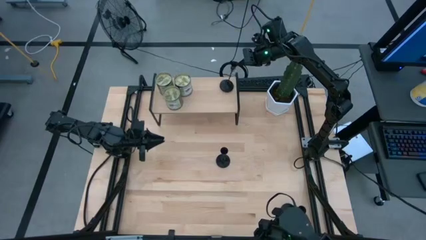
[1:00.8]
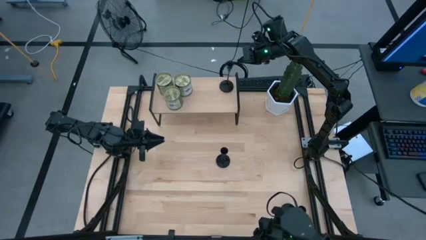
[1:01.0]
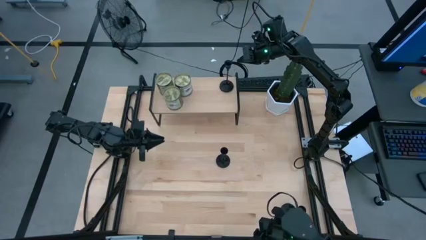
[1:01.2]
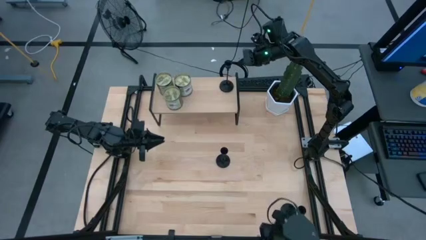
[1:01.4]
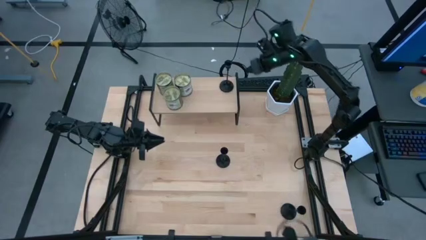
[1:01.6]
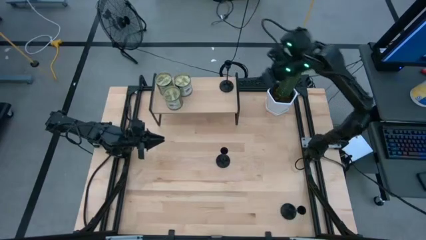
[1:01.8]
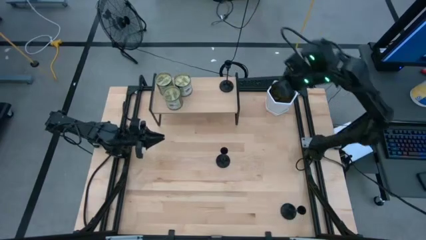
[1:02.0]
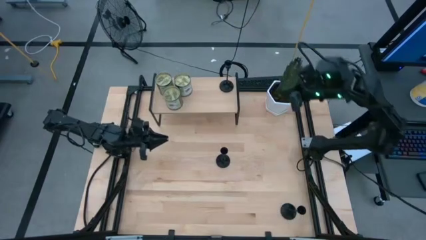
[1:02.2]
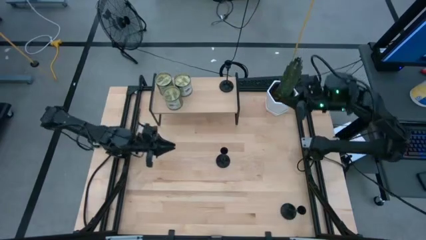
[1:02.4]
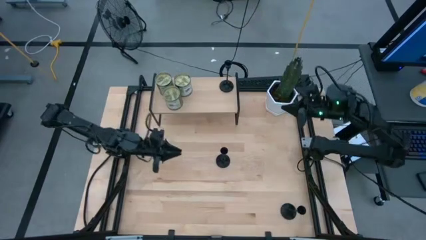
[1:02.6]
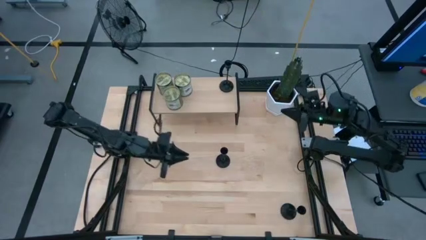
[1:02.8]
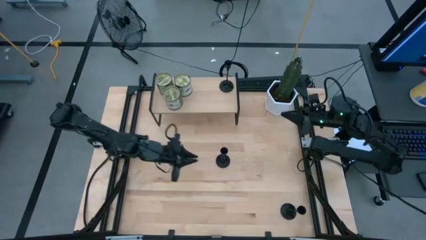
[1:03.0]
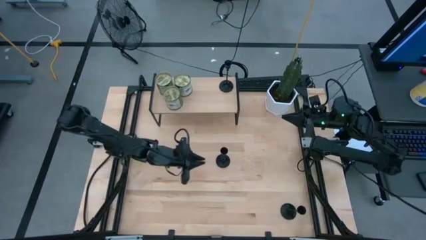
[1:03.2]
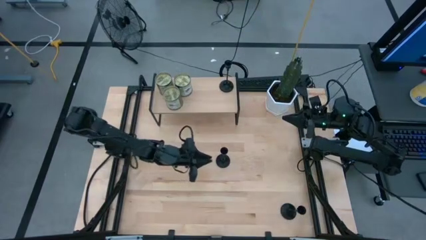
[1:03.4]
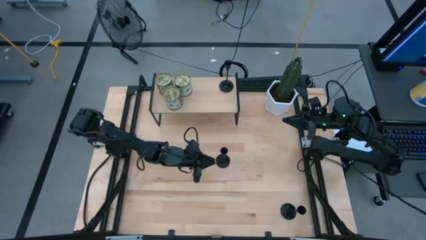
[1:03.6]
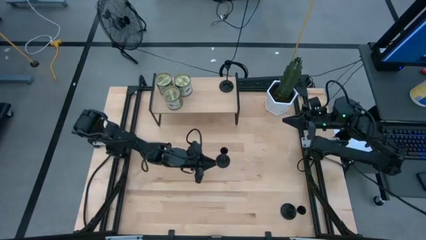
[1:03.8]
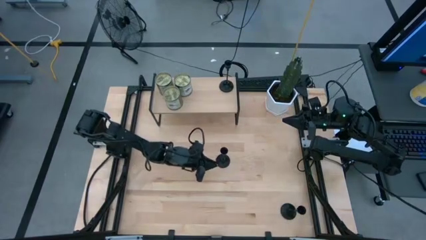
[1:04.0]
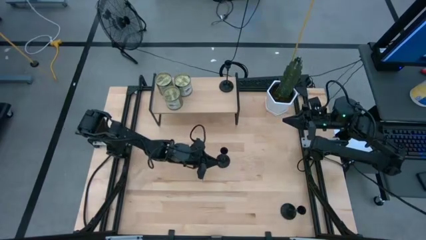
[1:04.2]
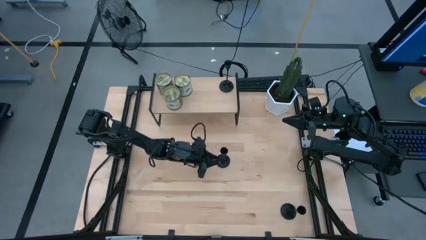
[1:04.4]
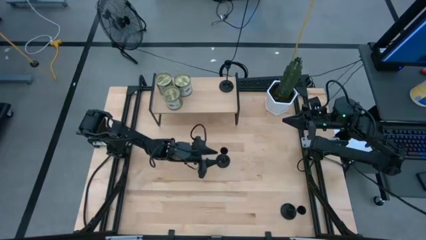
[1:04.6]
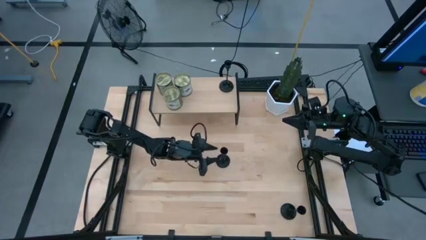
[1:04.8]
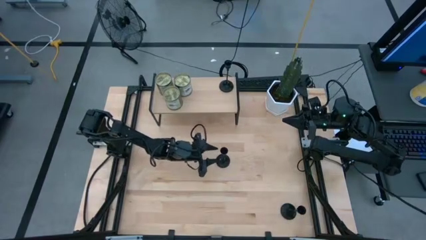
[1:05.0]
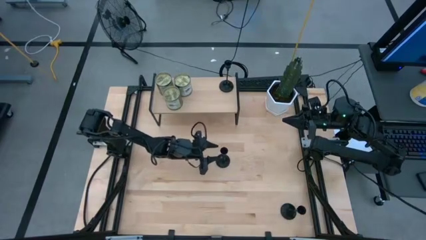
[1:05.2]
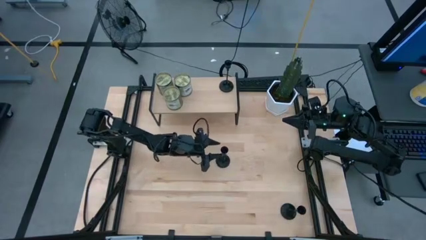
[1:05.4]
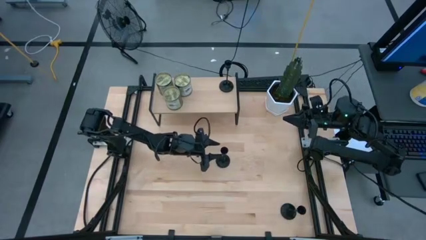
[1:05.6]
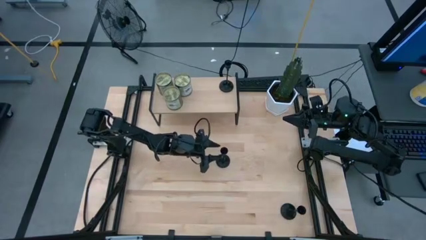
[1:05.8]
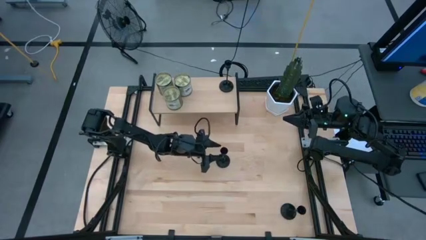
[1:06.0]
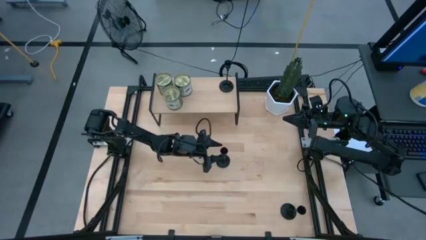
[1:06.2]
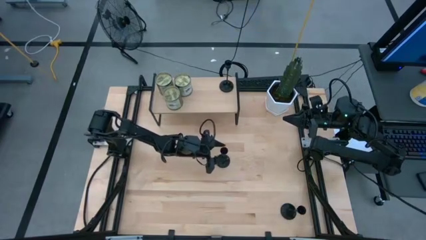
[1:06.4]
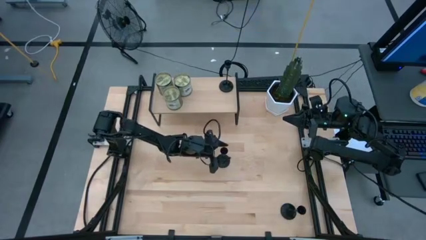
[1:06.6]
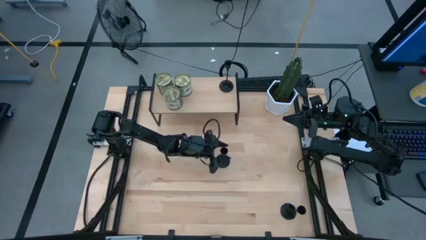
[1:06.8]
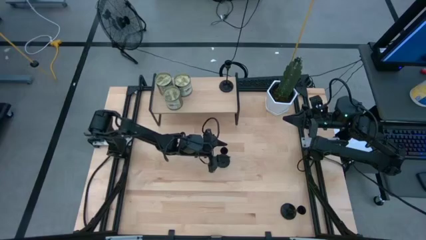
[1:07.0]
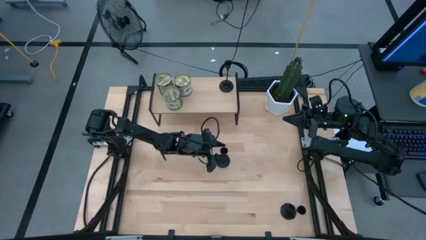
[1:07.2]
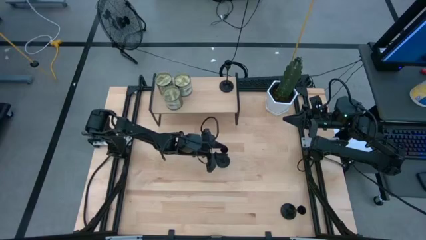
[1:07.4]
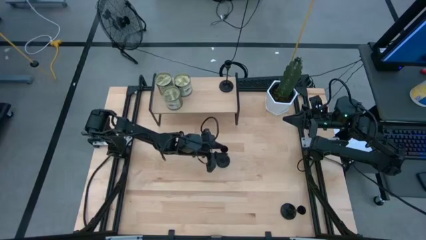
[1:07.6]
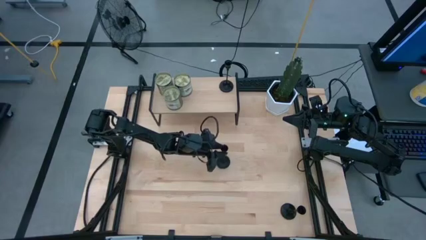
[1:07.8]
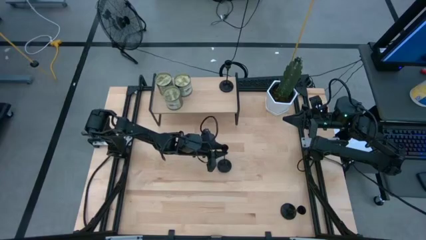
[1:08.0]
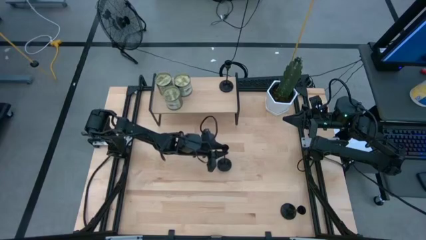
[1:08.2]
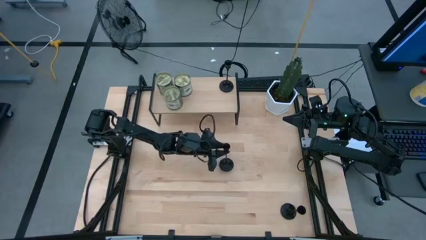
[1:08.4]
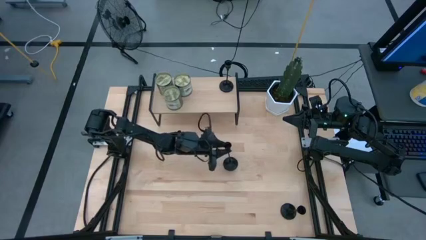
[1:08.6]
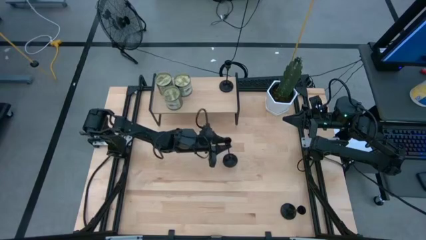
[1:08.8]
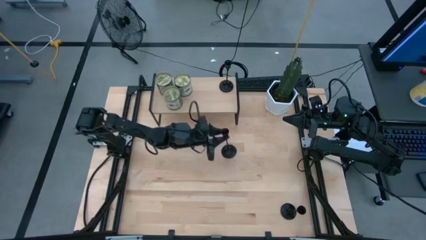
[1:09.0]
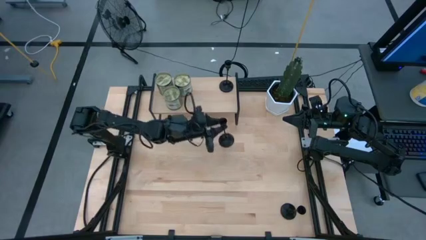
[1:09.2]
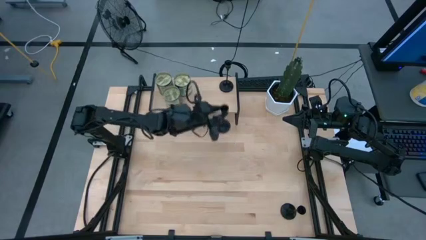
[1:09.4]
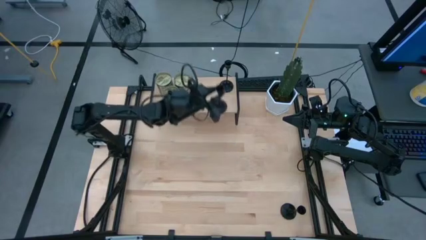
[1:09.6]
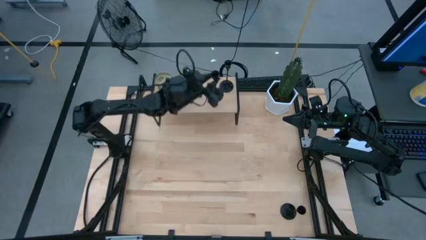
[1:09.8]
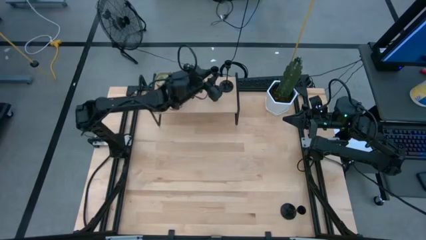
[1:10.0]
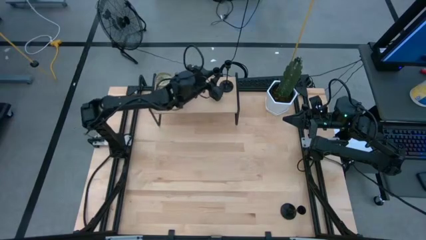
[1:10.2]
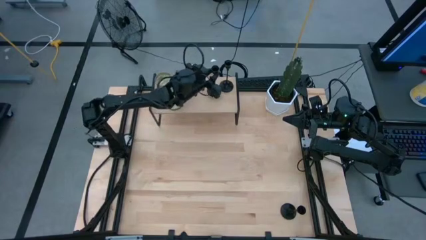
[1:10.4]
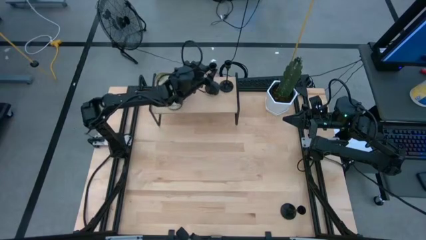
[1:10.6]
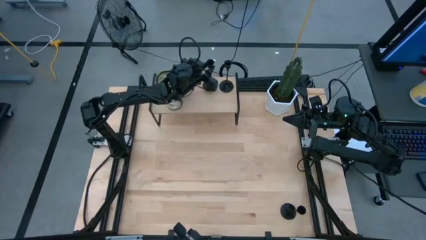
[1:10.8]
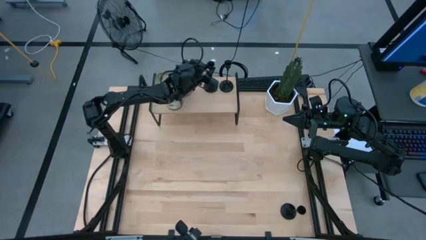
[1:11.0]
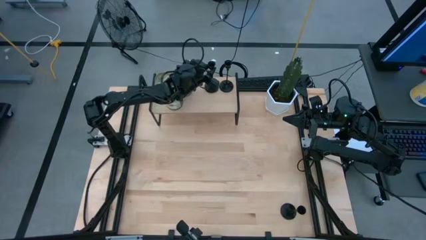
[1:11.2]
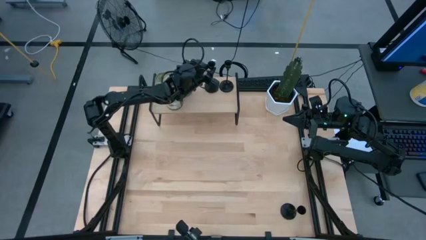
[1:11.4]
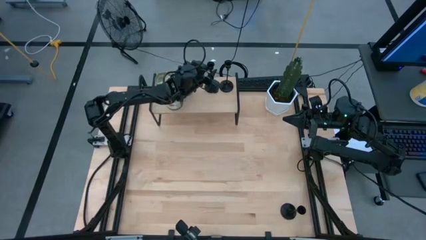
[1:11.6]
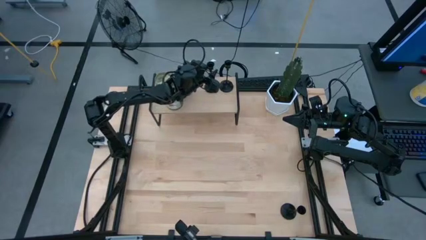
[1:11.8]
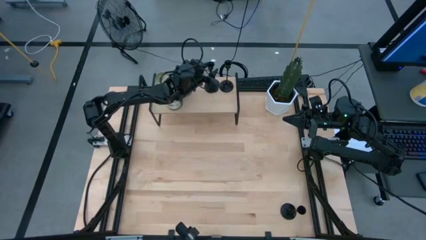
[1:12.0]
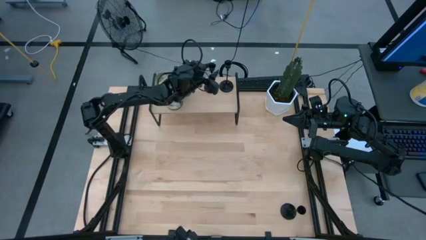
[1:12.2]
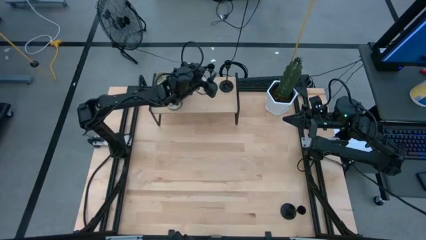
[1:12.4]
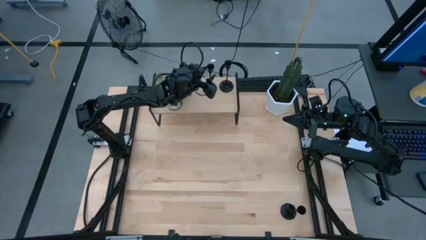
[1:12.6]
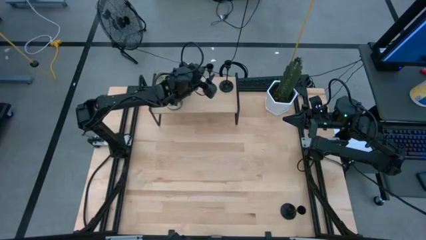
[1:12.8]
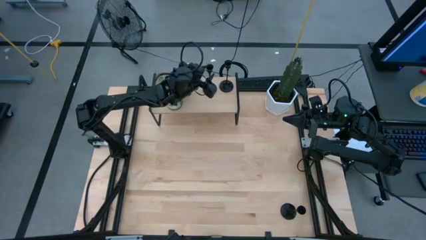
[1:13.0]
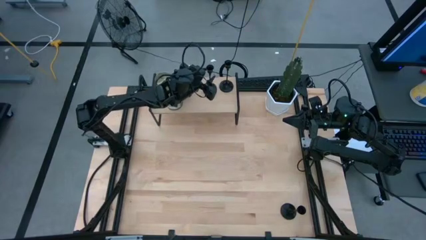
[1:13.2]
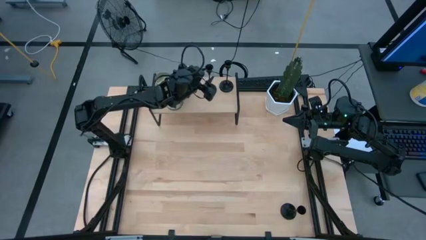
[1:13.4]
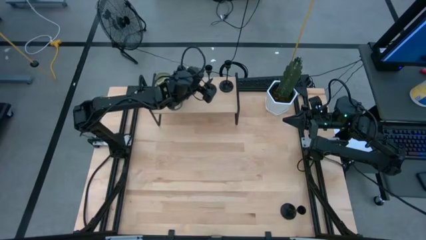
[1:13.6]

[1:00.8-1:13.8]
Task: Pick & Place candle stick holders
Put the top black candle holder on the shelf

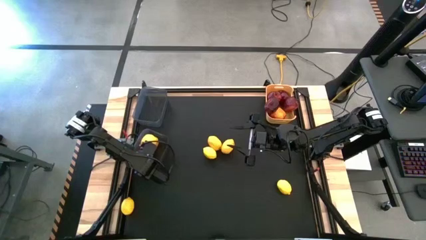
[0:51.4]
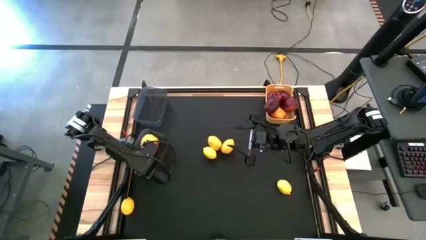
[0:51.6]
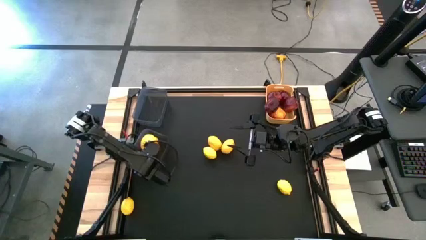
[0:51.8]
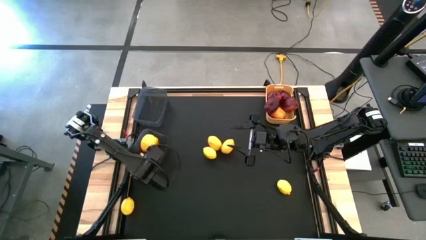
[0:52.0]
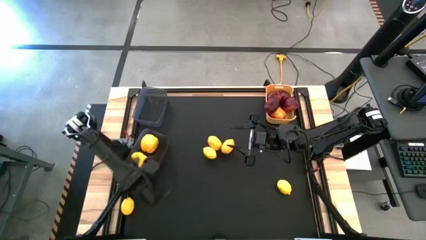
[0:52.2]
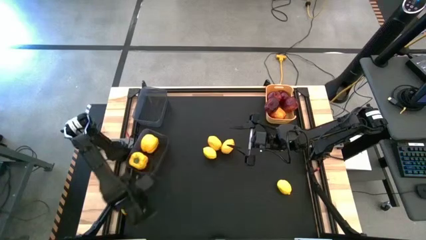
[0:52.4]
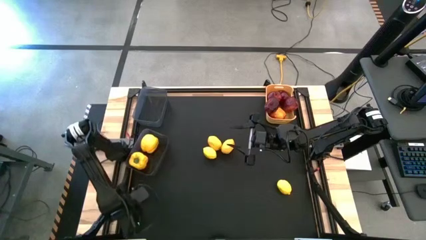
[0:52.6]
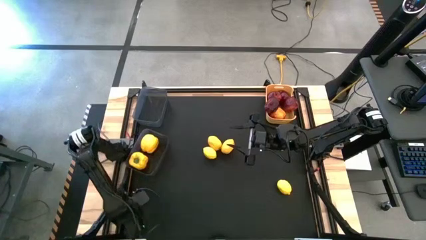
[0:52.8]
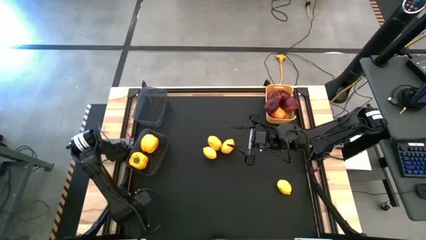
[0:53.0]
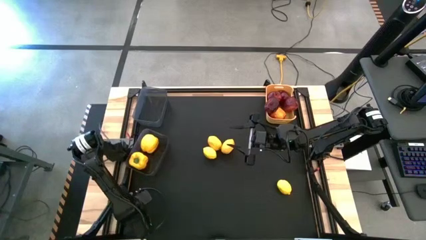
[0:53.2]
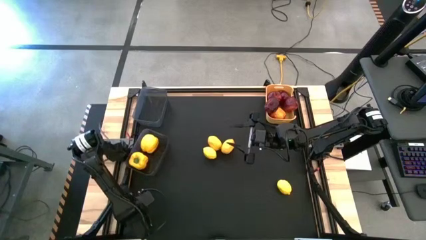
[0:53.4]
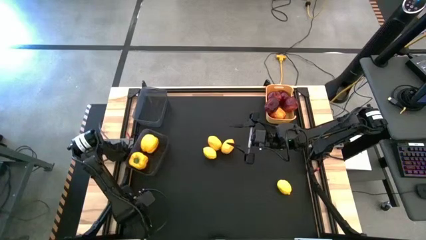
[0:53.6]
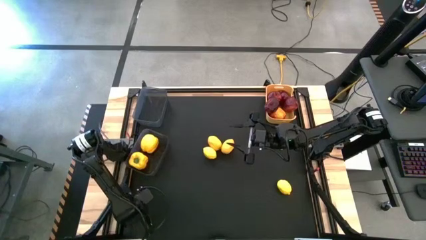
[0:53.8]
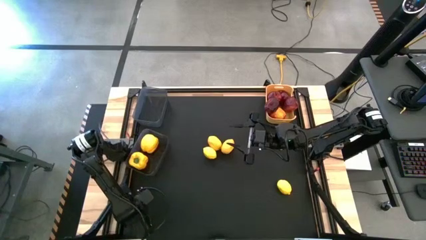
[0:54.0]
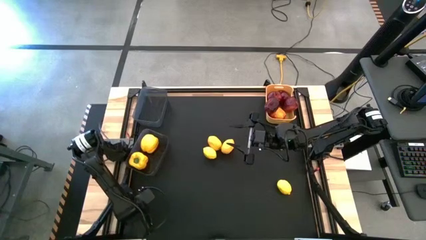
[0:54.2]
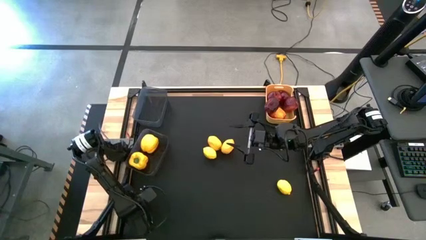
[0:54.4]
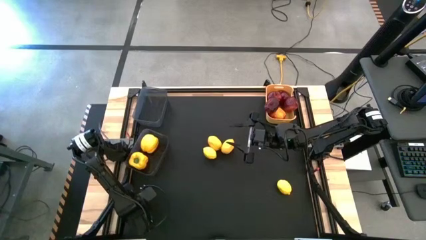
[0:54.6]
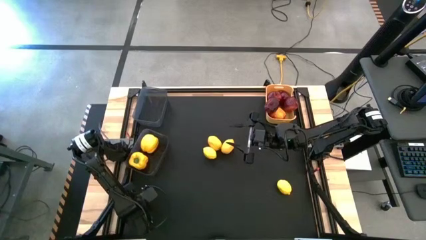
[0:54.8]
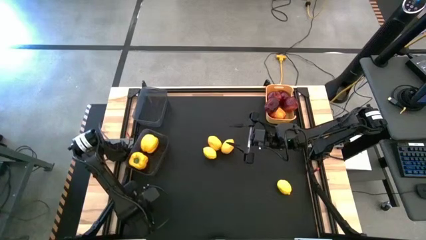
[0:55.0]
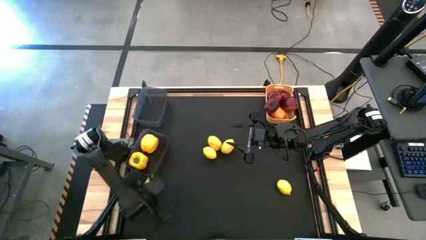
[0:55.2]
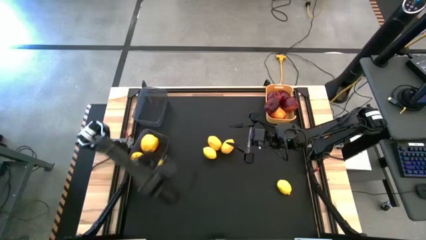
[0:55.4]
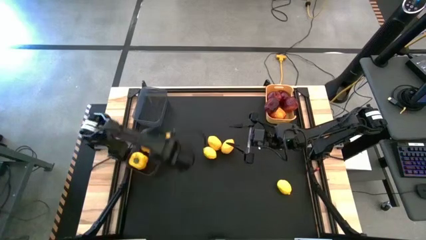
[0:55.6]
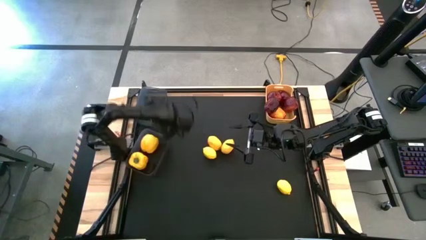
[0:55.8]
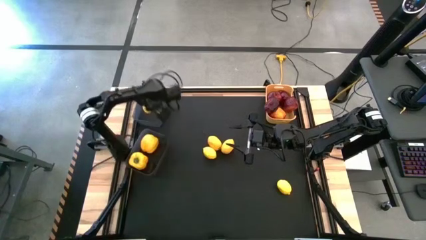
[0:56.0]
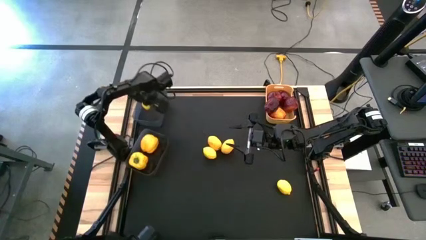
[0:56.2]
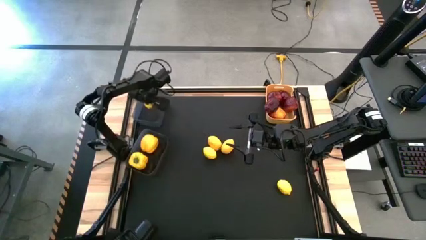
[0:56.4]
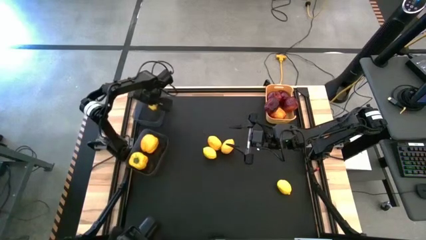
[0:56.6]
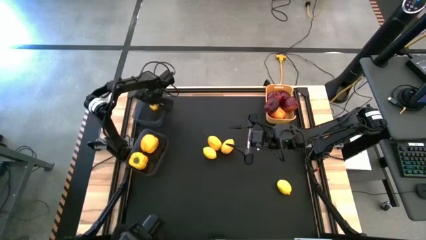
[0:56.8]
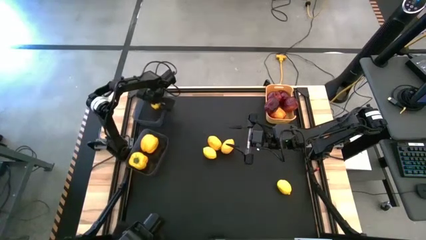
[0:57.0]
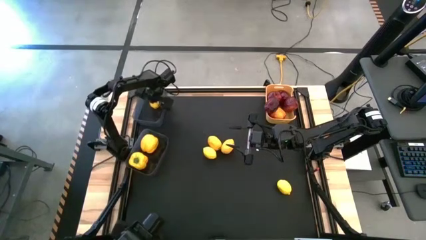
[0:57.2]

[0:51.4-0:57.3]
Task: Sort produce into baskets
Put the lemon into the top black bin
